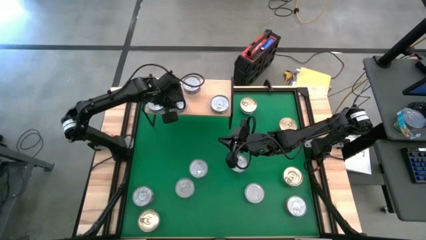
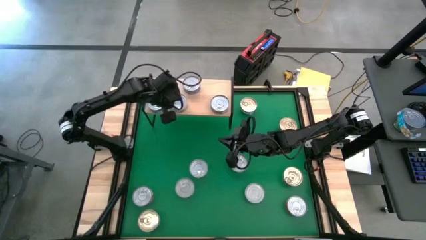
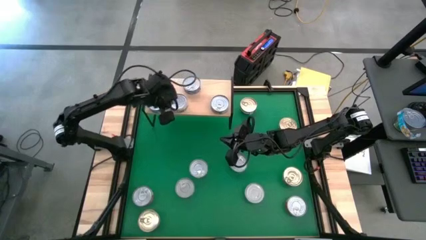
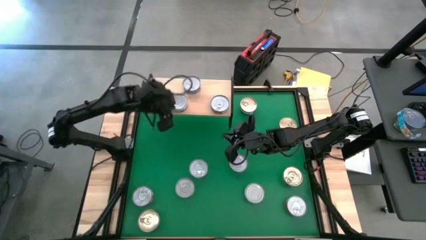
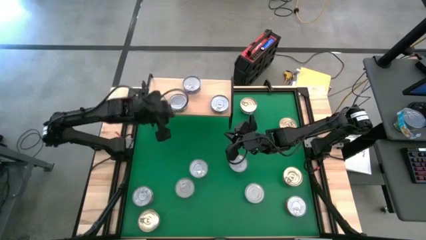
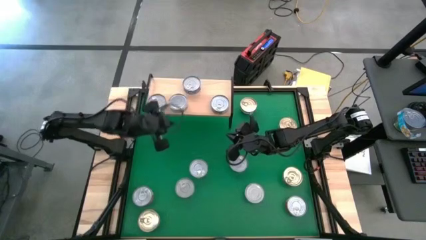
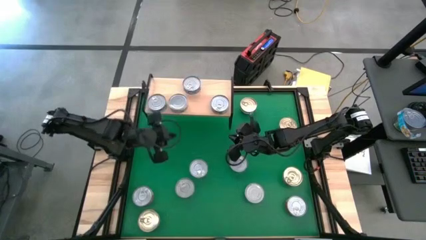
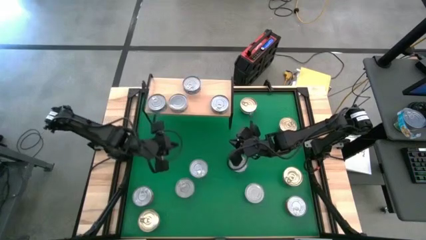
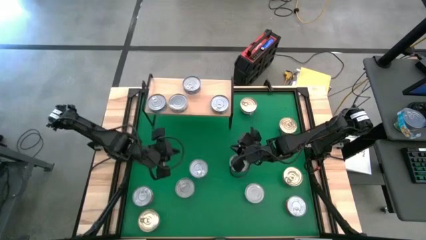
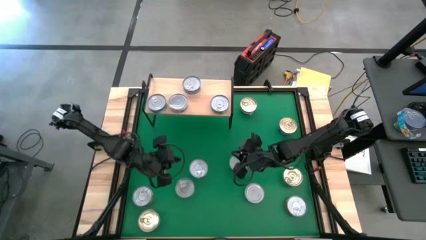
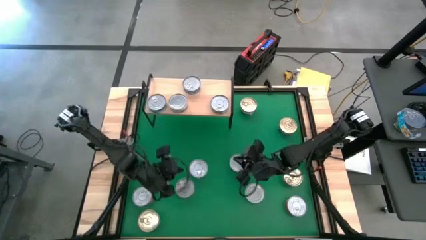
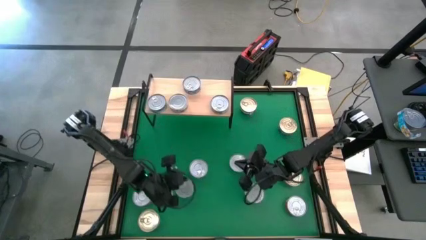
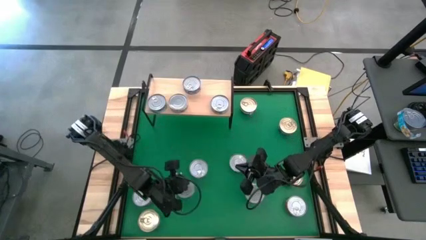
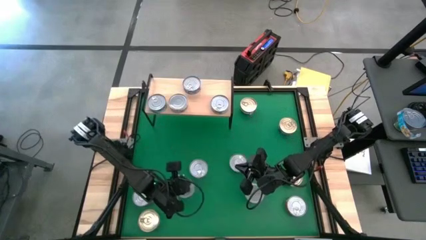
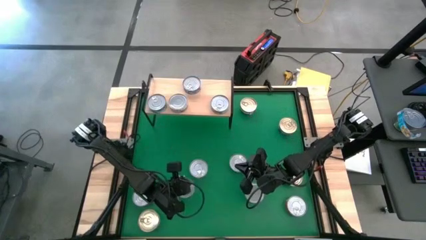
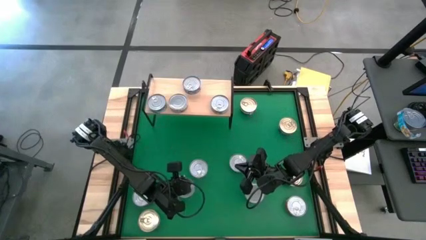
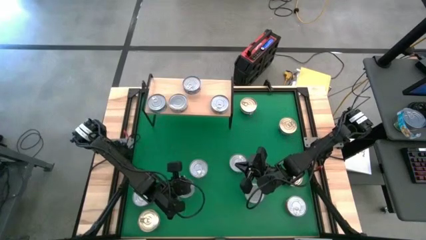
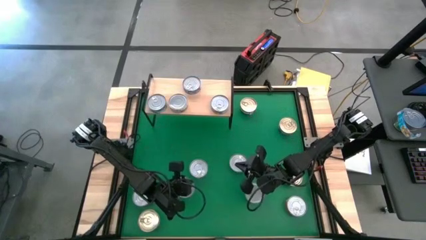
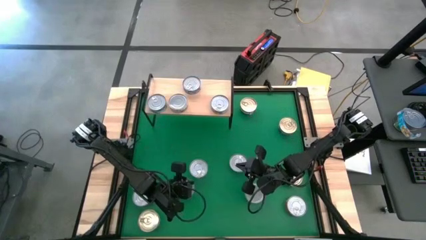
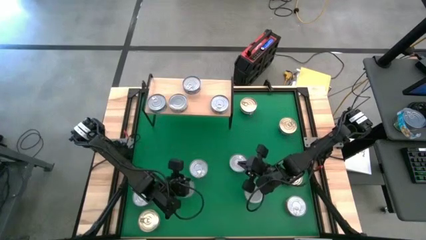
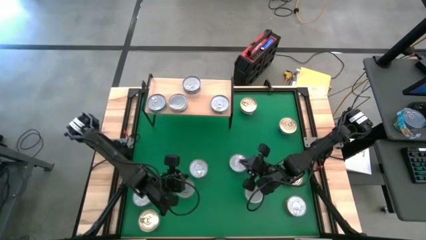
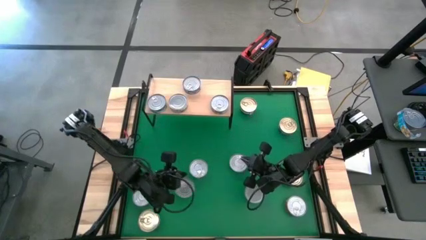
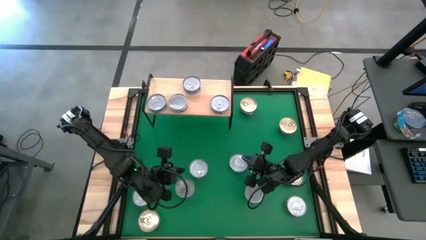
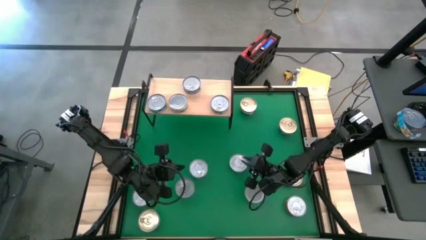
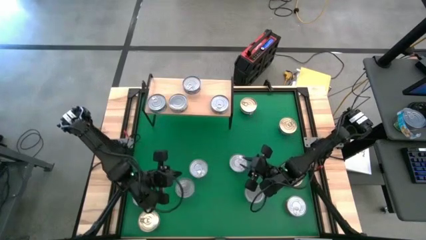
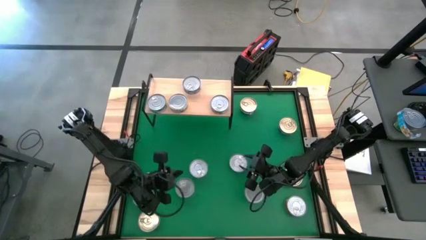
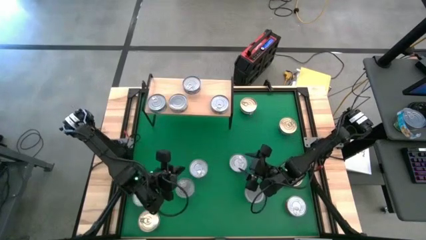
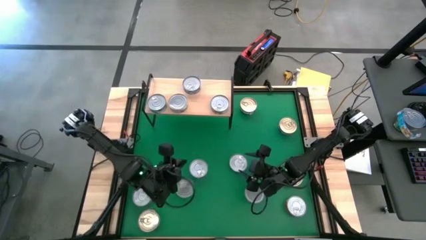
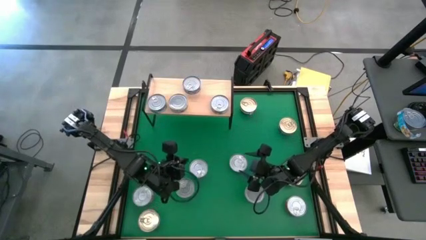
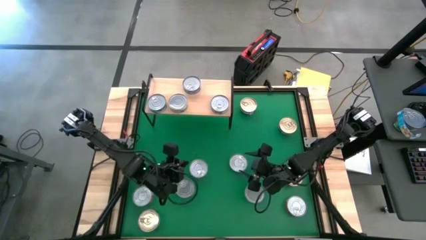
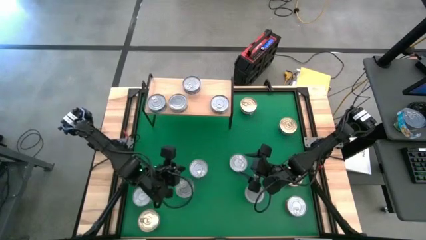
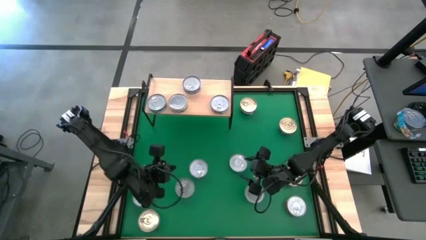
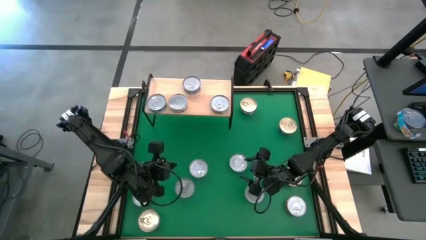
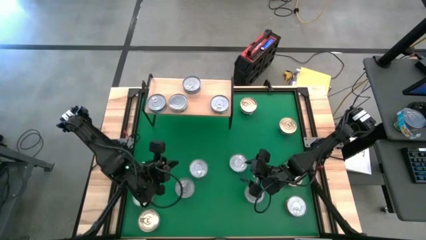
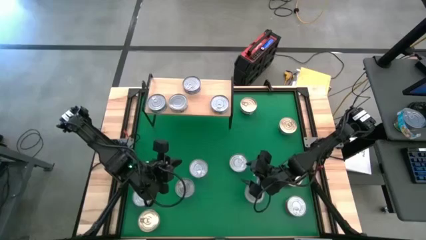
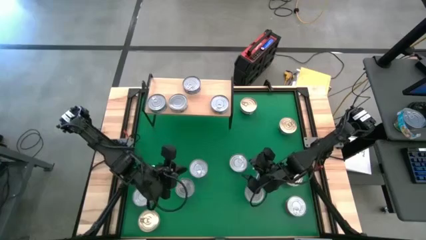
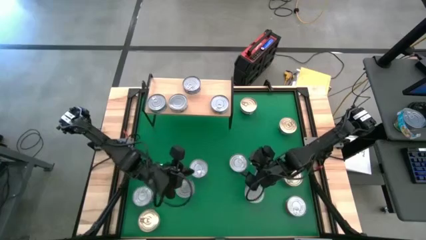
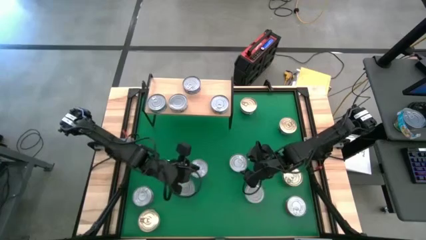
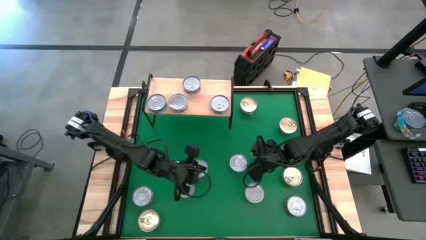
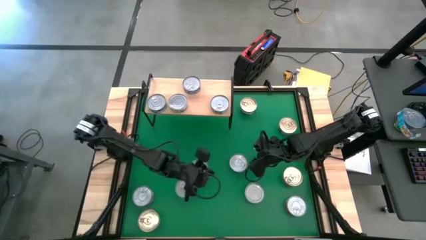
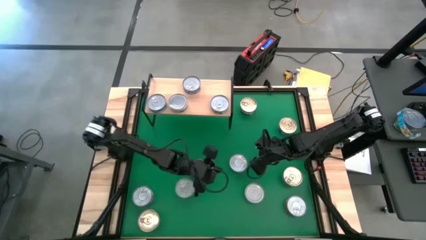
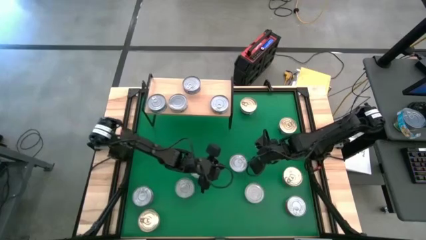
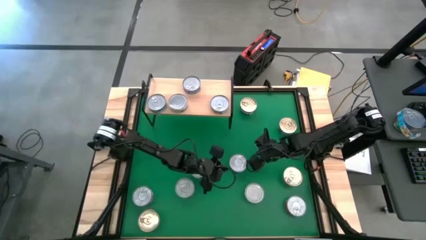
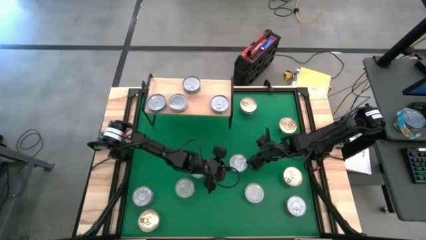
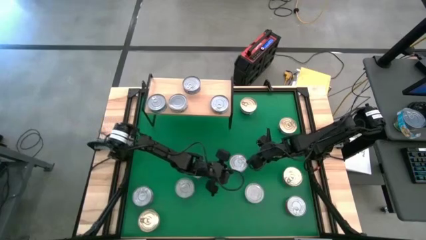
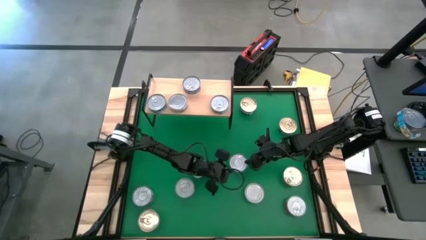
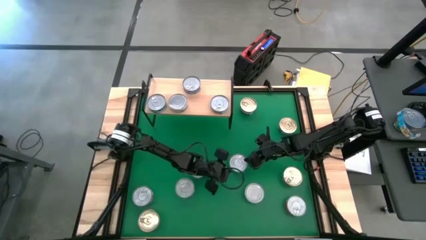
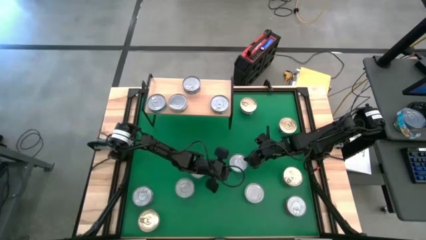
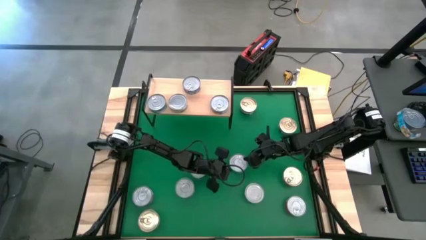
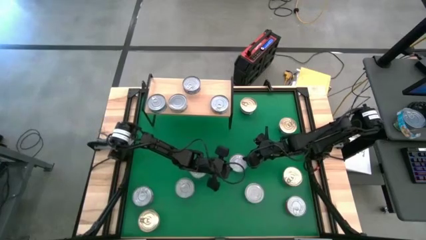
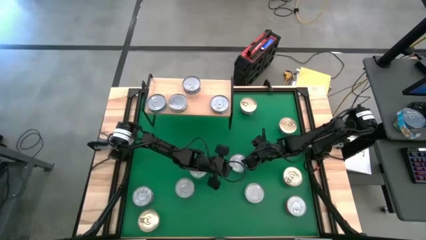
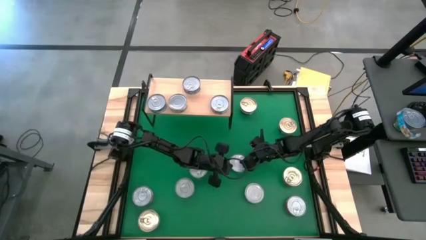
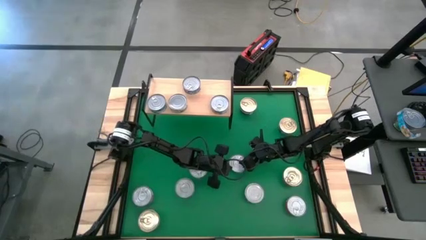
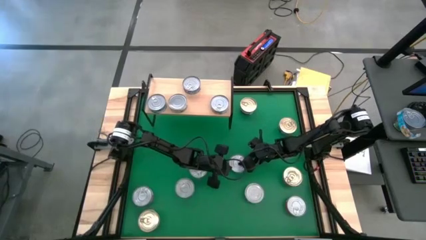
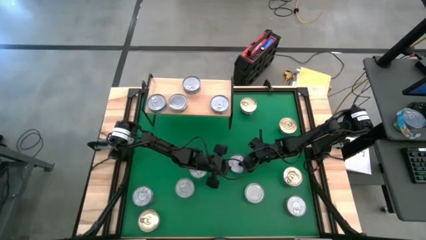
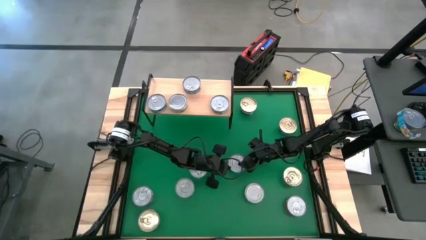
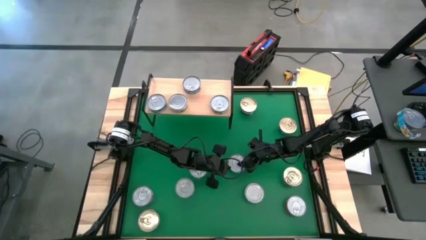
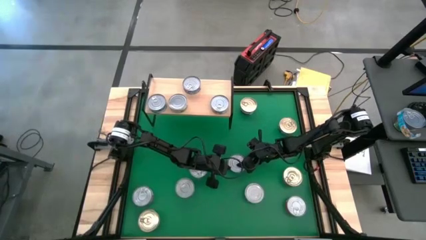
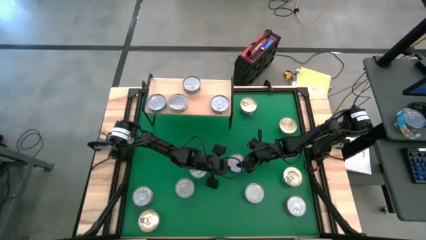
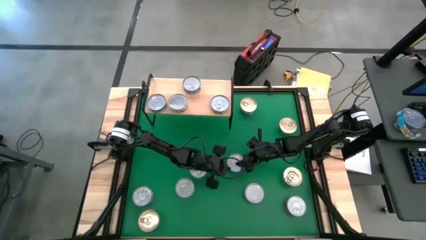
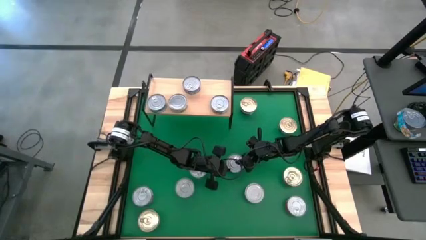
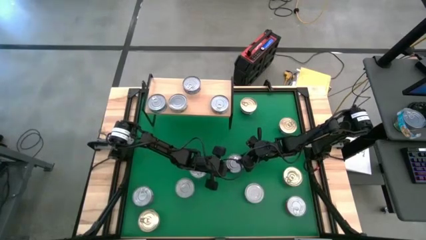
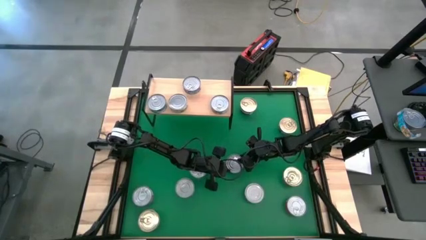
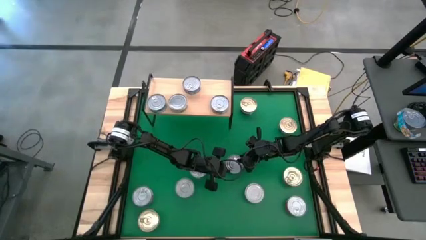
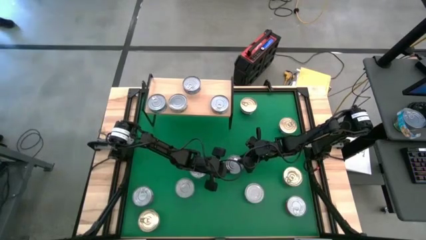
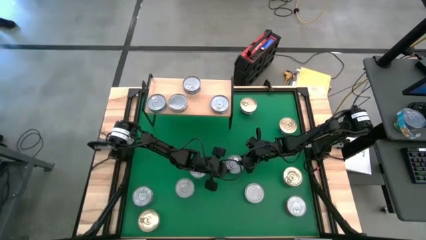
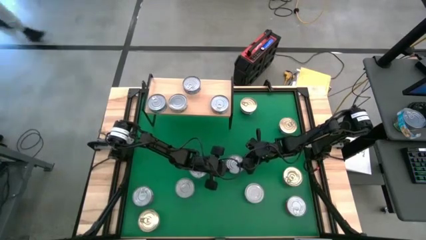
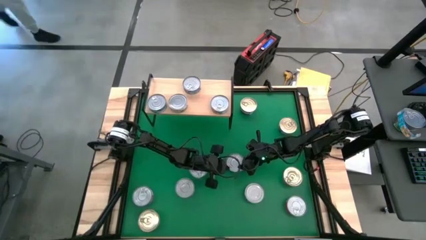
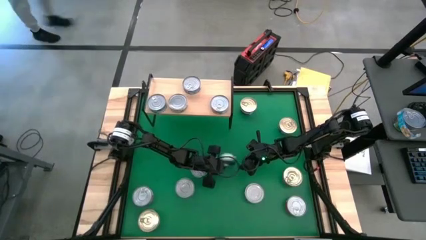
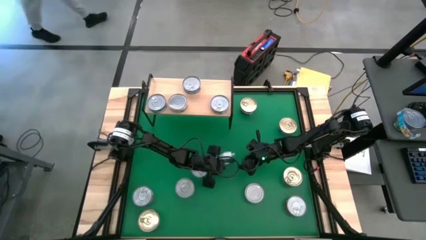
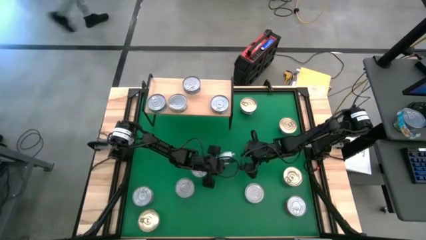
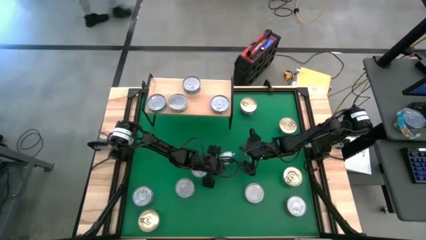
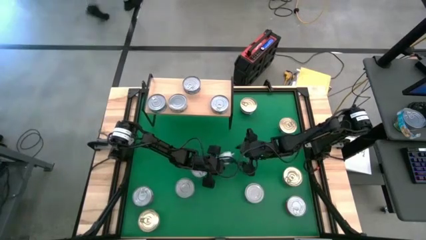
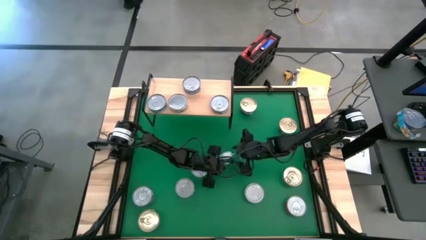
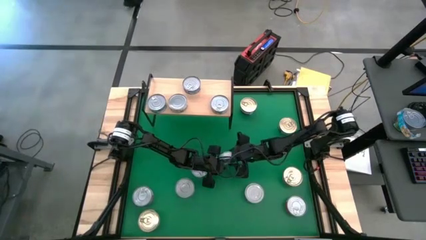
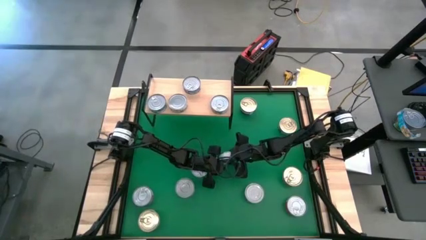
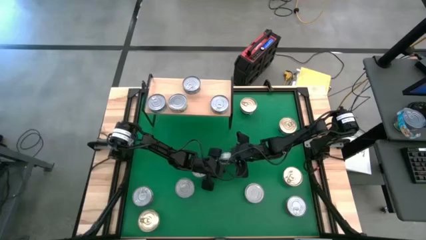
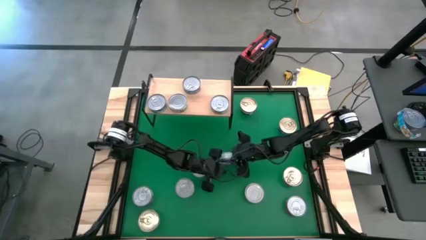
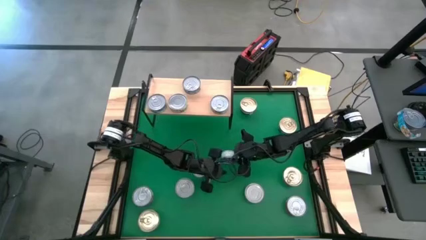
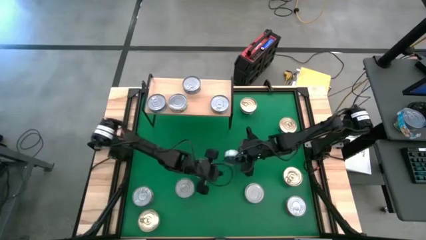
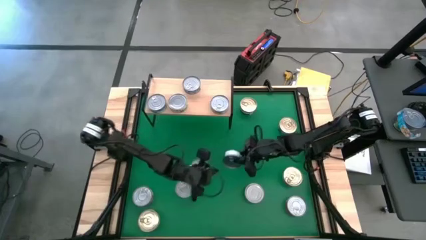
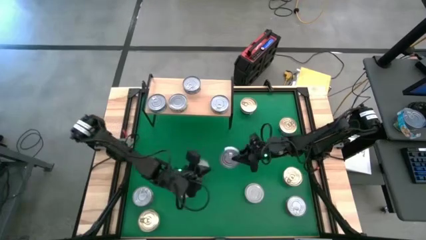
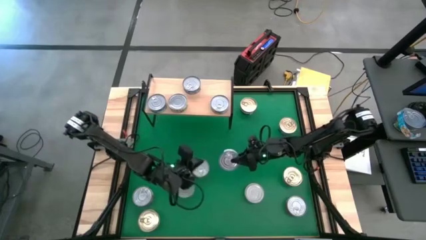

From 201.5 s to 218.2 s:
Task: Stack canned seafood by type on shelf
Stack the center light blue tuna can on top of the light blue tuna can on the shelf
